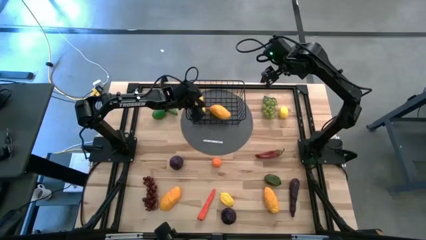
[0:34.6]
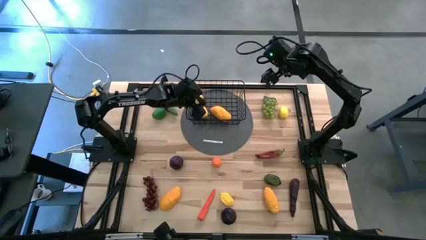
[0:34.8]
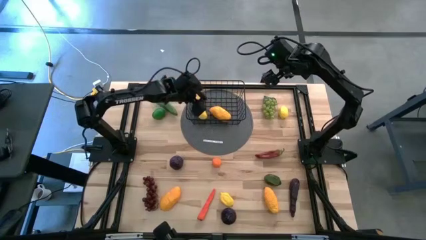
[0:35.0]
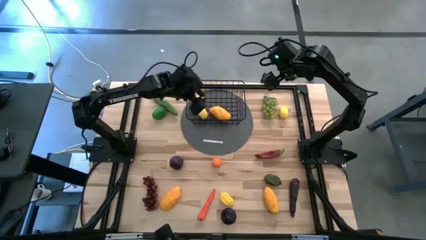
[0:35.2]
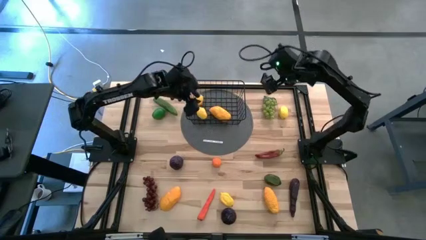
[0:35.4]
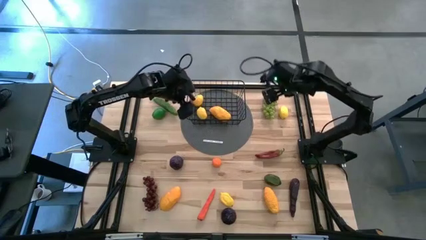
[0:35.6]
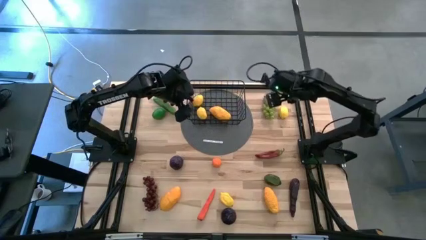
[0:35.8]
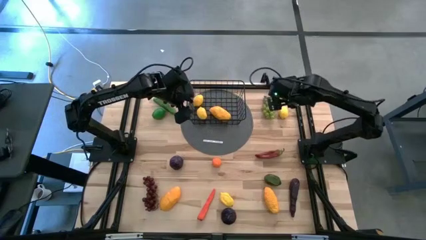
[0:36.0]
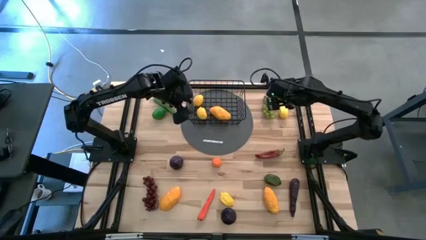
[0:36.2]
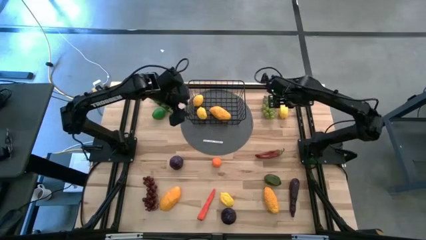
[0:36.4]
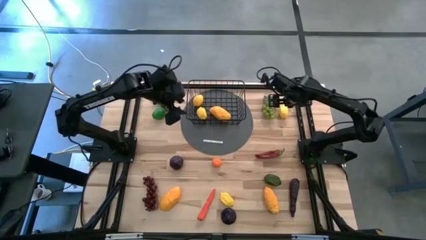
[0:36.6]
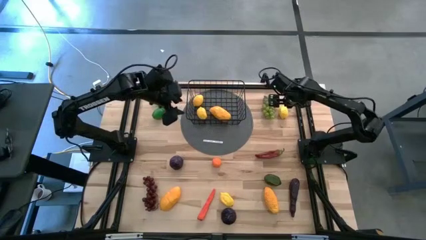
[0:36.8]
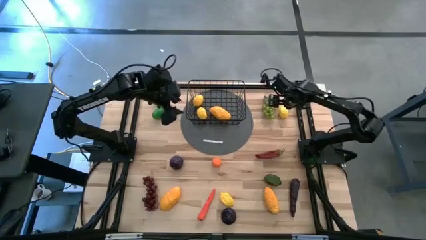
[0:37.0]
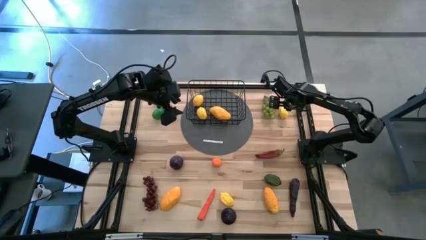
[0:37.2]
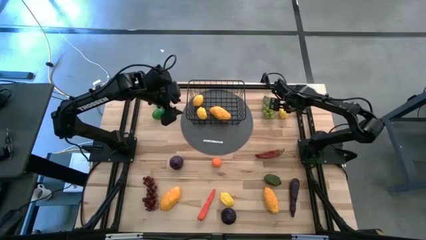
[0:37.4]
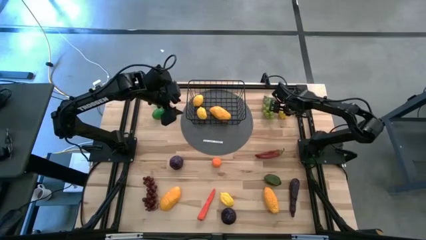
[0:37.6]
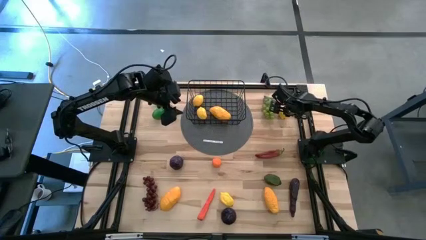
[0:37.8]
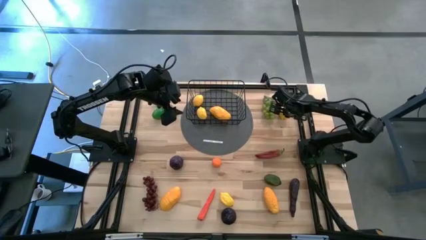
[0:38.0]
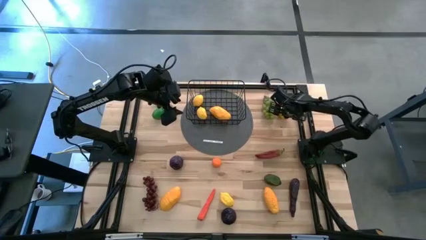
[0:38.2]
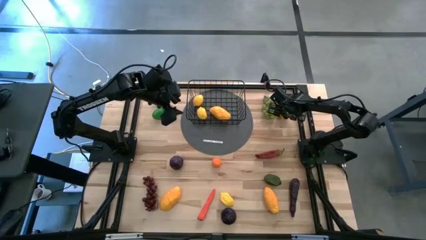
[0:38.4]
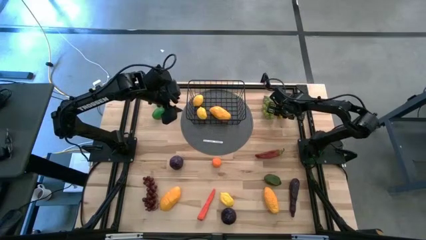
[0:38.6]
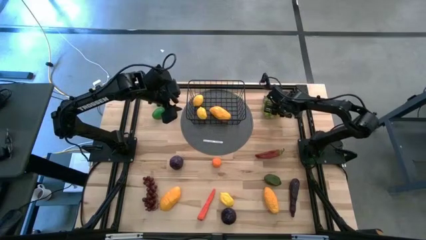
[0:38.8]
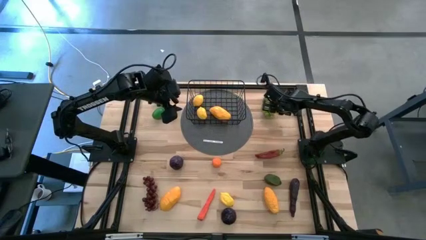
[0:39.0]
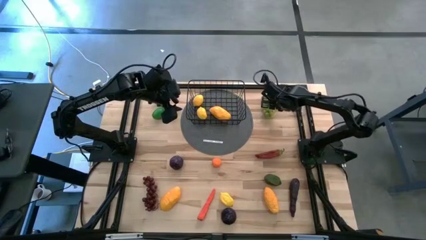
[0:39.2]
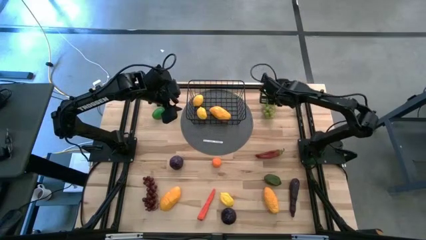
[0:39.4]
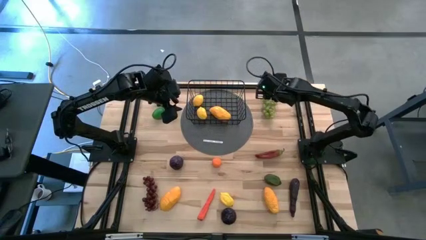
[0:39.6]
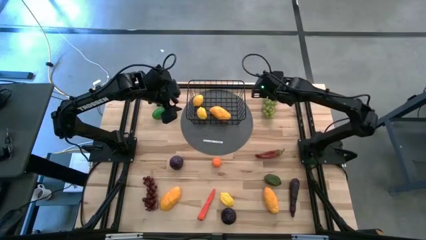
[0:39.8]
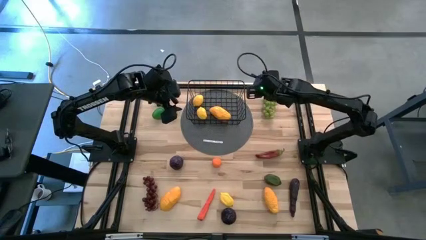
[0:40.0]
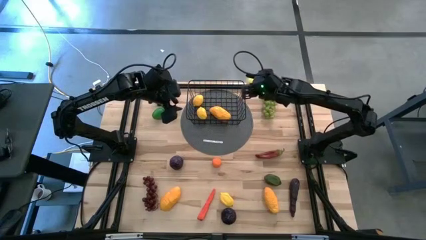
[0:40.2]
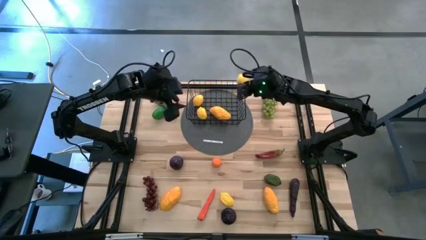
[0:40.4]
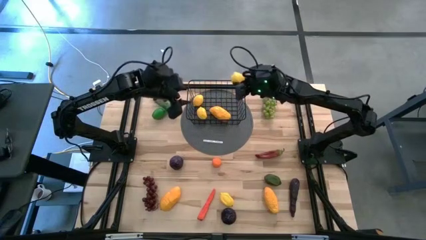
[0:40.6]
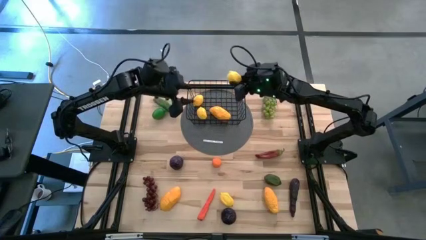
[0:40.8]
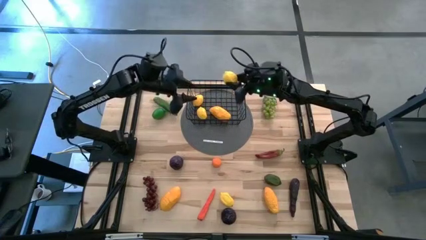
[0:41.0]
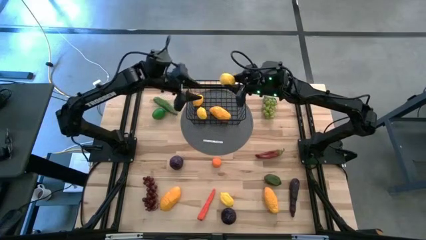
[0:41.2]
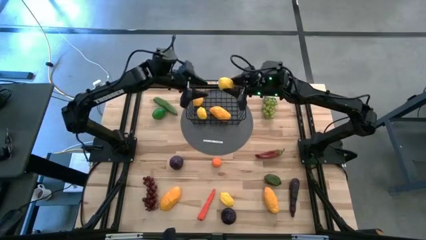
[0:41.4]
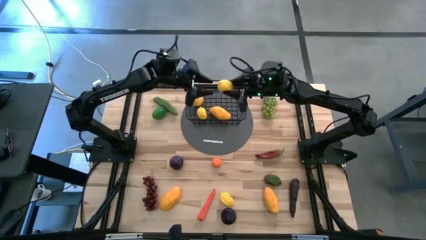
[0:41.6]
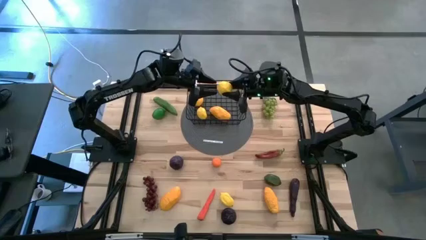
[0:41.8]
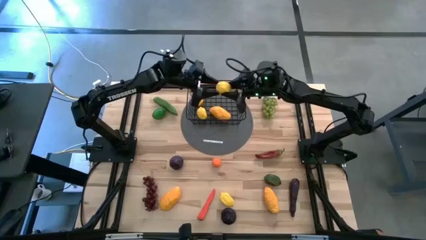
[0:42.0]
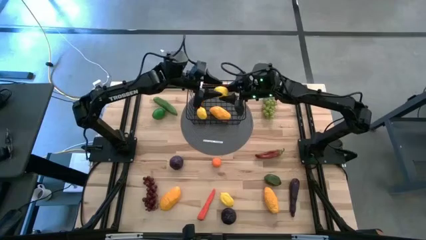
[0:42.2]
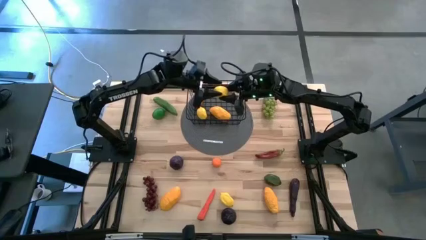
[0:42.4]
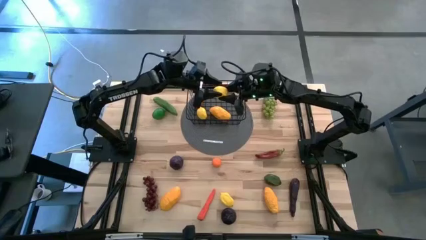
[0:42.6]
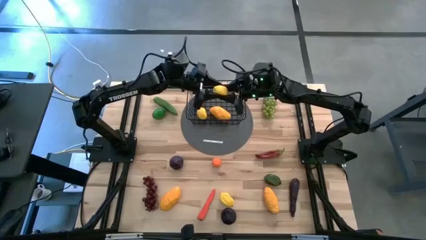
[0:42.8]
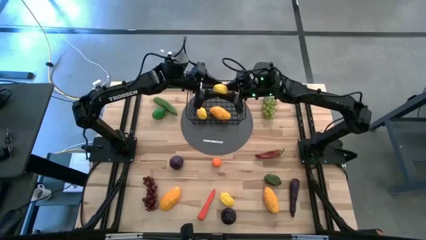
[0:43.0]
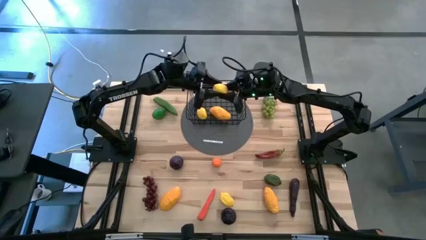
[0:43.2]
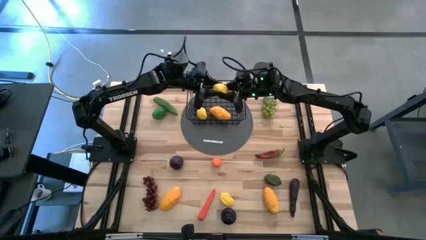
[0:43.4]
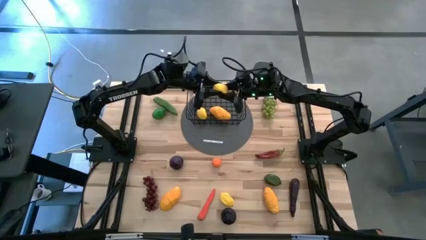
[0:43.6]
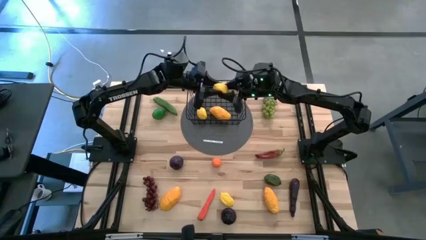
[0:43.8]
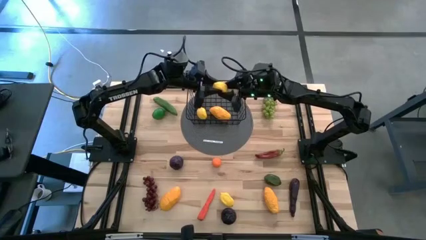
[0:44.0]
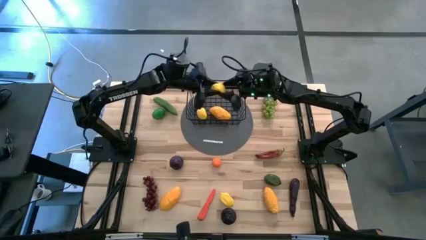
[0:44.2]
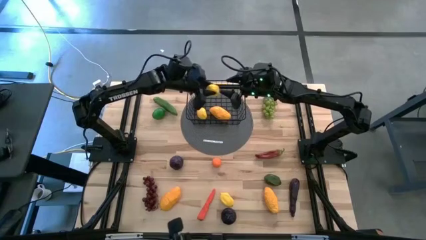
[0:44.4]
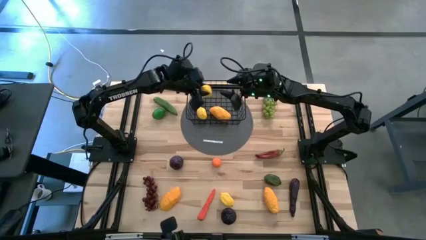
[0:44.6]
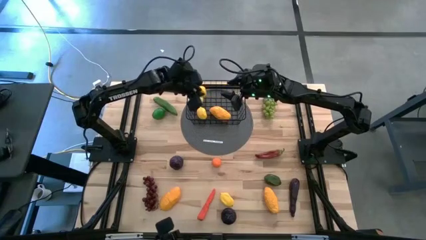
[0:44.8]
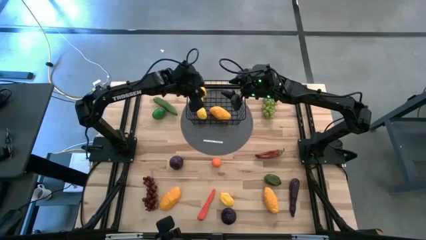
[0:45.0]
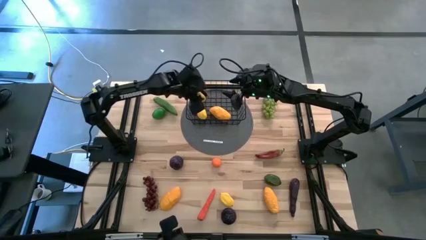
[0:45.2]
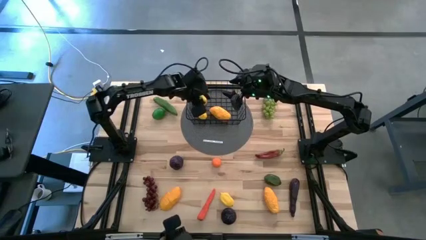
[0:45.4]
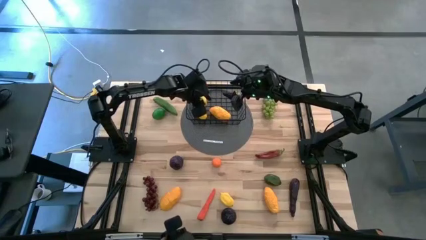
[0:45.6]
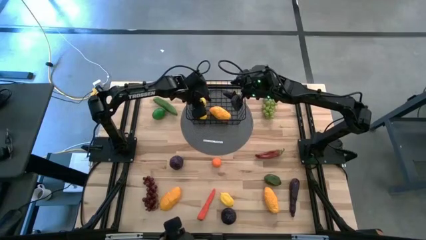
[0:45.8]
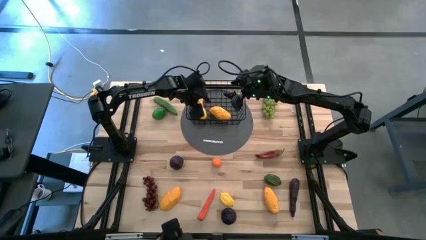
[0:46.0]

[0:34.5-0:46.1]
Task: Build produce basket
Put the yellow lemon into the basket

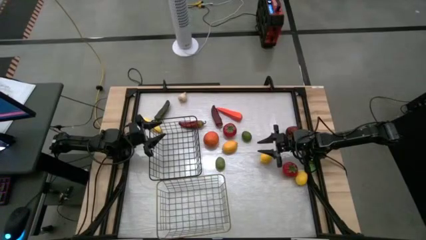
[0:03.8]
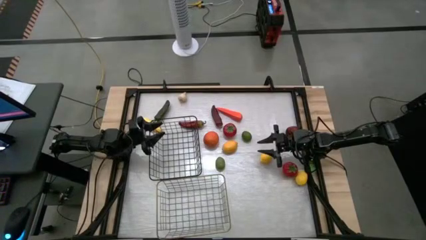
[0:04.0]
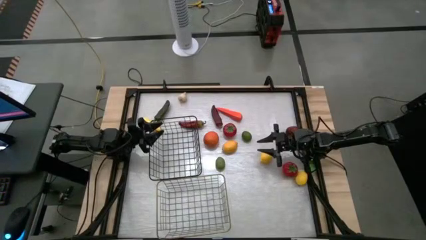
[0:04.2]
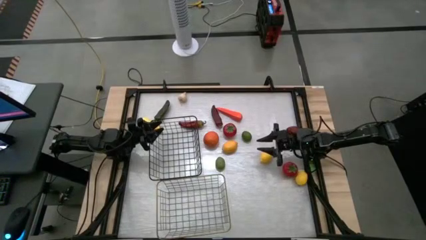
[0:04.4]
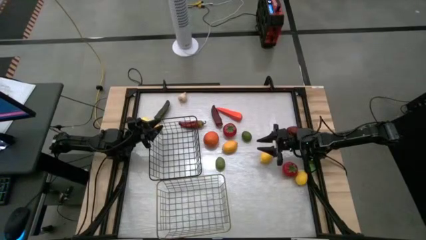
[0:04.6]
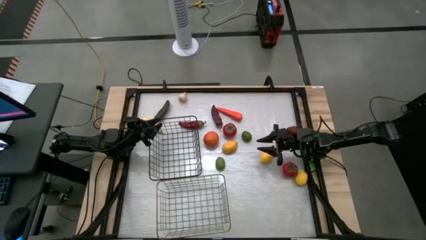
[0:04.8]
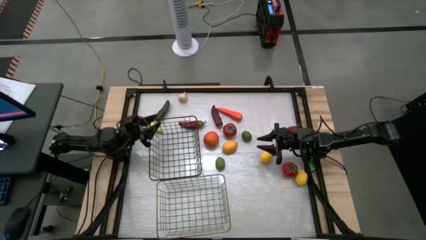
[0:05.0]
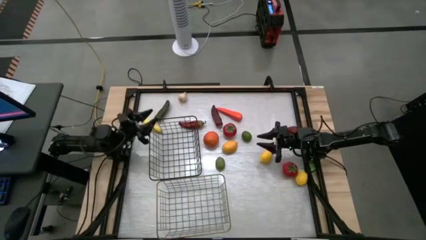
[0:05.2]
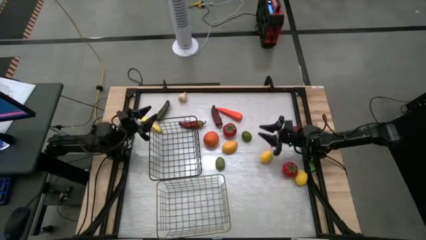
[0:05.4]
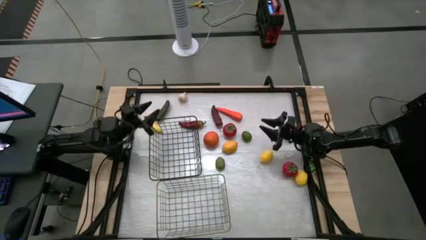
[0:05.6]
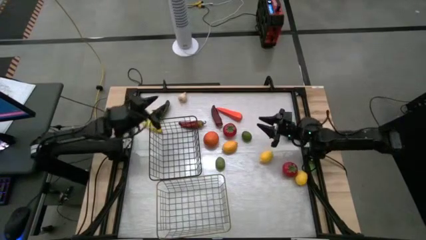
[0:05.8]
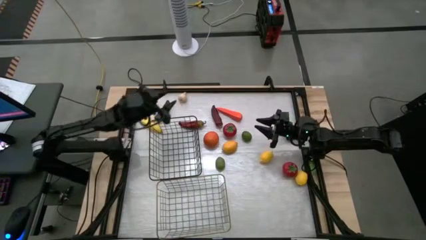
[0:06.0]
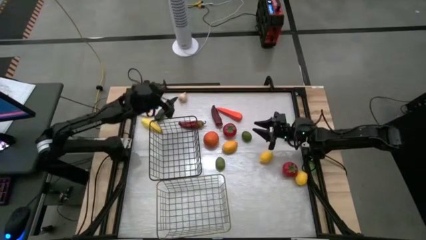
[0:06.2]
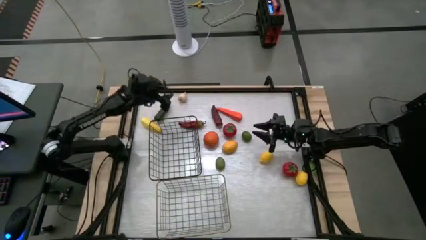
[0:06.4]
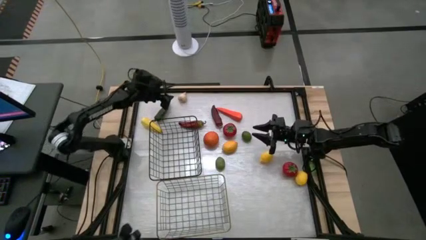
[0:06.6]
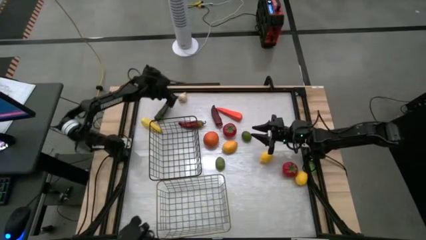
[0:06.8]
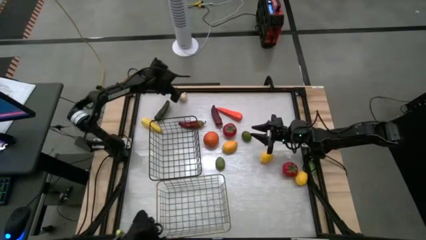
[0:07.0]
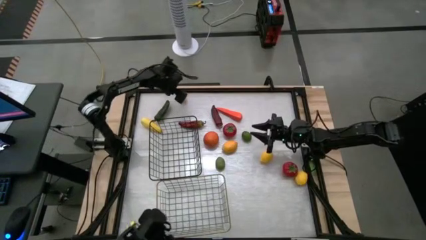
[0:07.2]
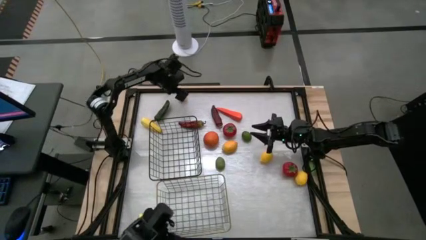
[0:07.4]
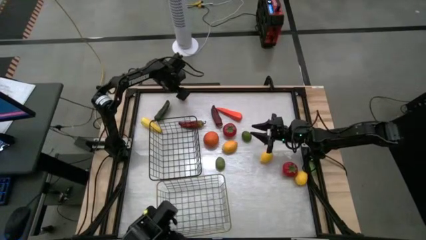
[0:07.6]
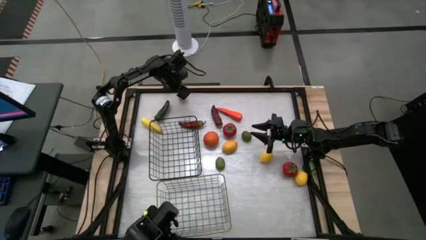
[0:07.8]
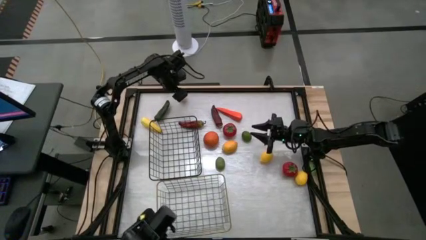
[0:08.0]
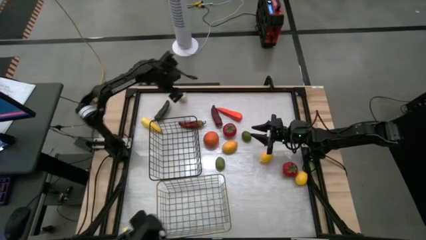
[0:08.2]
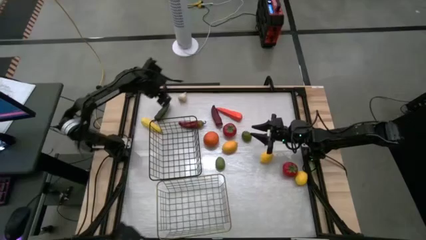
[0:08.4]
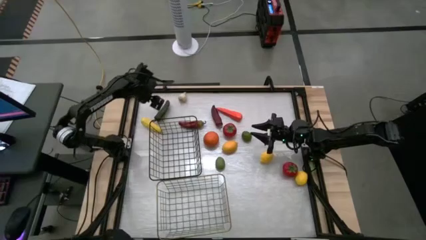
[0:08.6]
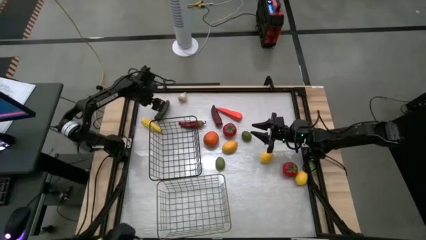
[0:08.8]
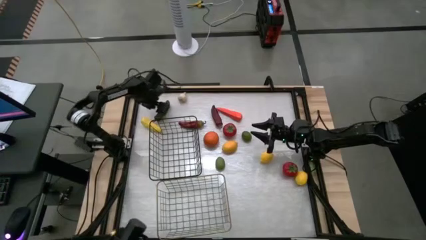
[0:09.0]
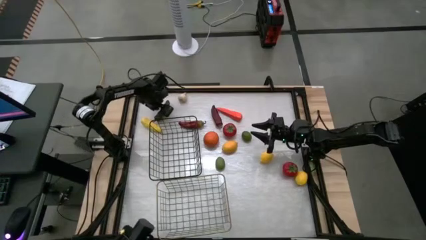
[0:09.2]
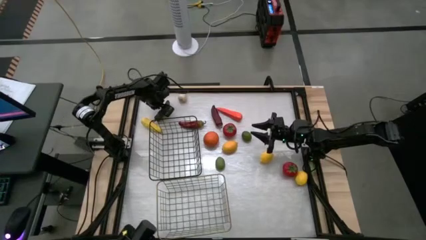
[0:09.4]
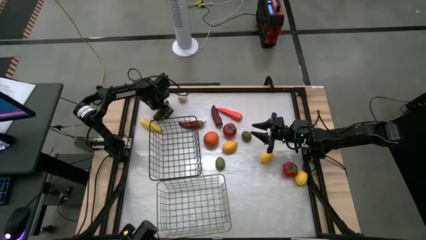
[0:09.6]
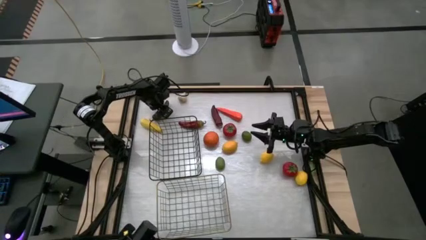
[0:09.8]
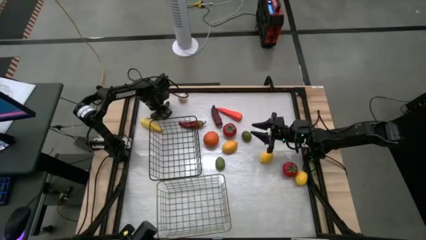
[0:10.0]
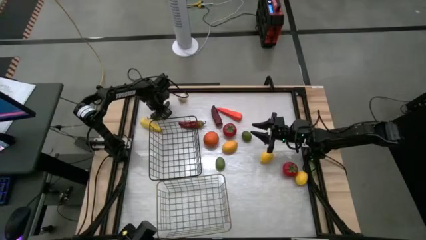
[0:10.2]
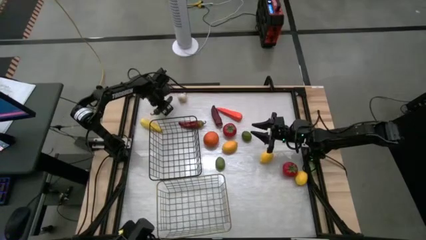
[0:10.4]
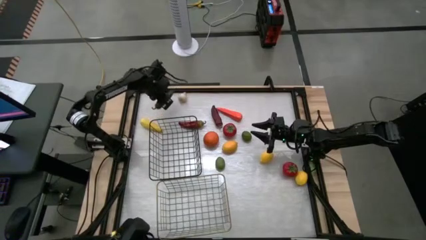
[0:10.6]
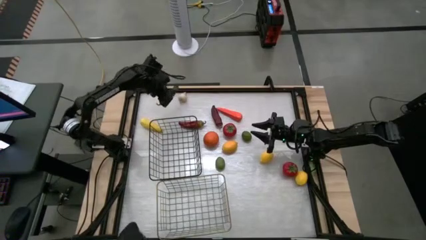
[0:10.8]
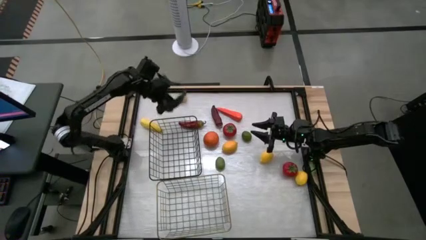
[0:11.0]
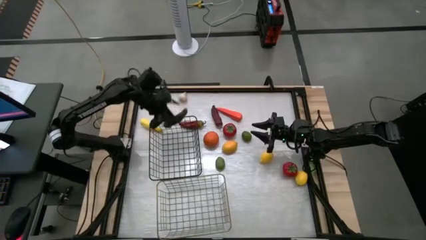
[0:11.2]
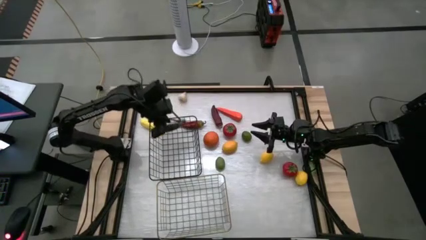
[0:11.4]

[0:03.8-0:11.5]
Task: Sort produce into baskets
Put the green chili pepper into the black wire basket
